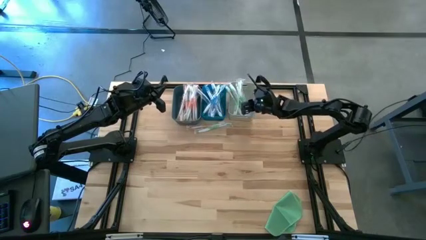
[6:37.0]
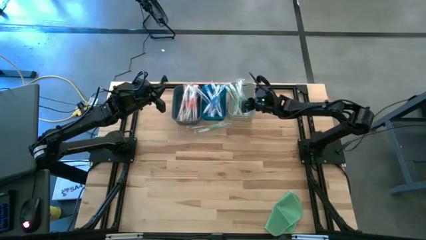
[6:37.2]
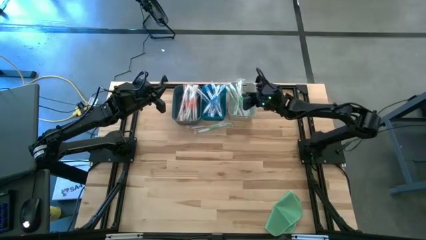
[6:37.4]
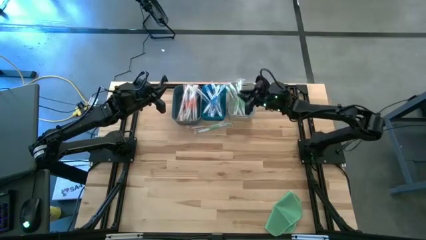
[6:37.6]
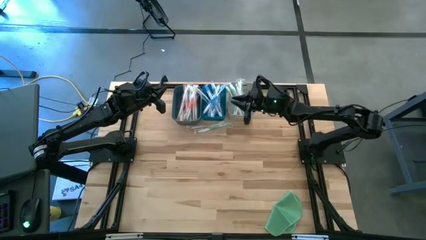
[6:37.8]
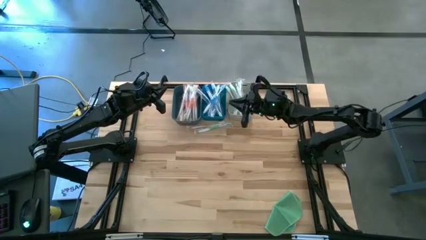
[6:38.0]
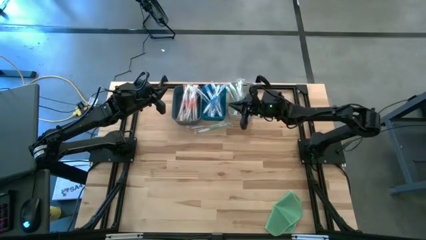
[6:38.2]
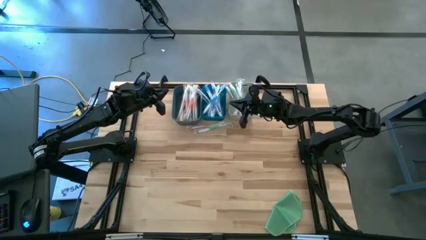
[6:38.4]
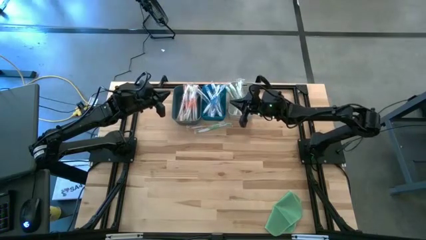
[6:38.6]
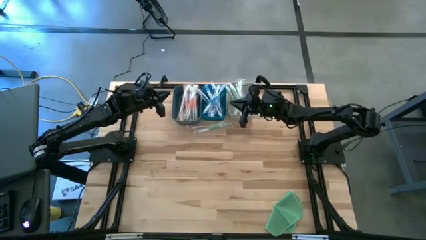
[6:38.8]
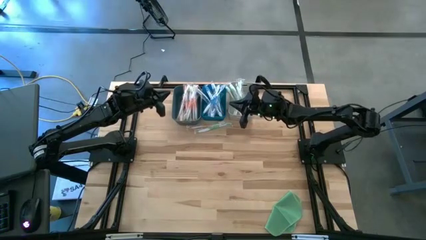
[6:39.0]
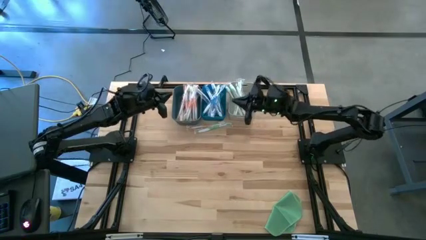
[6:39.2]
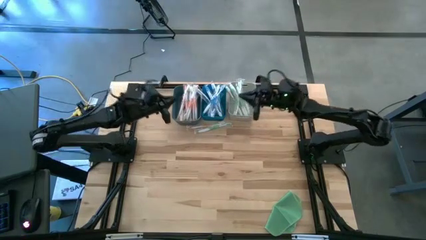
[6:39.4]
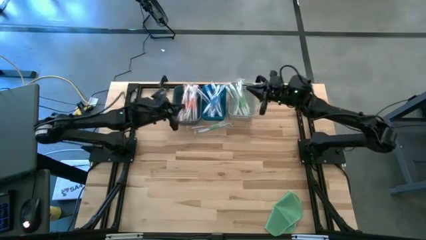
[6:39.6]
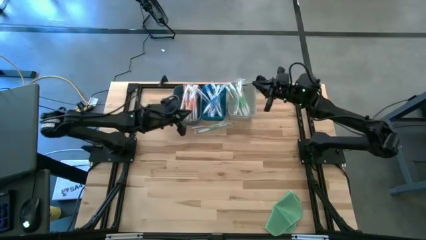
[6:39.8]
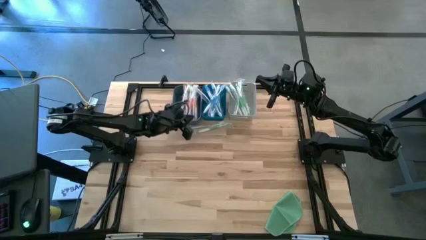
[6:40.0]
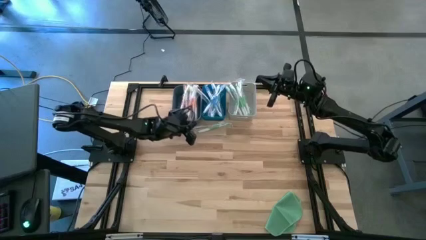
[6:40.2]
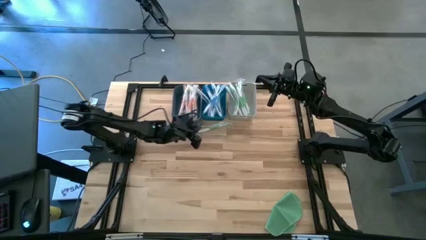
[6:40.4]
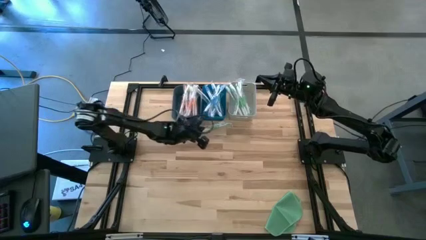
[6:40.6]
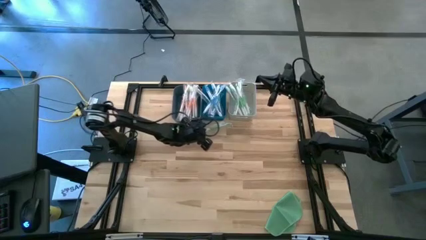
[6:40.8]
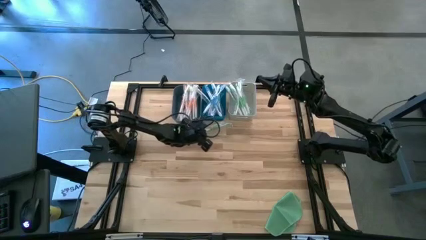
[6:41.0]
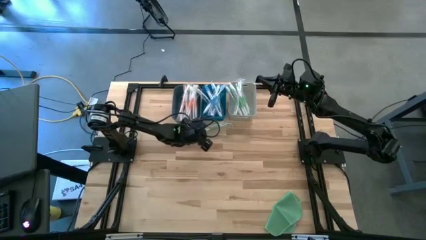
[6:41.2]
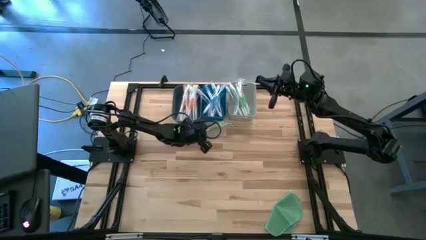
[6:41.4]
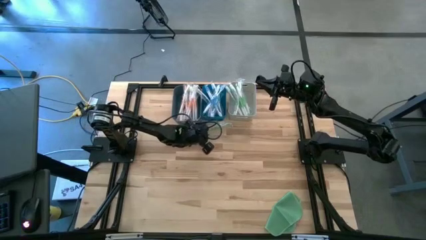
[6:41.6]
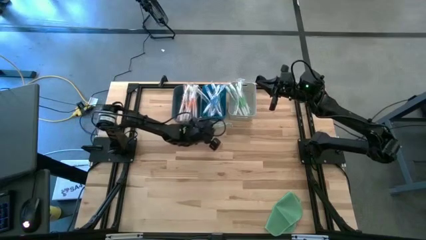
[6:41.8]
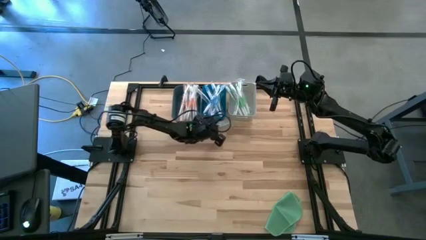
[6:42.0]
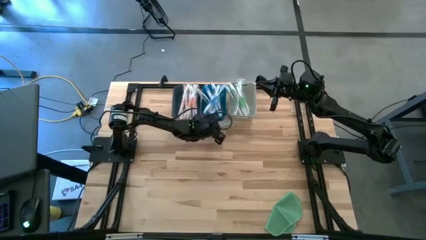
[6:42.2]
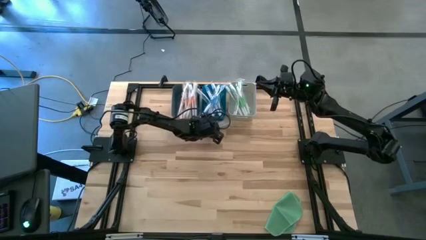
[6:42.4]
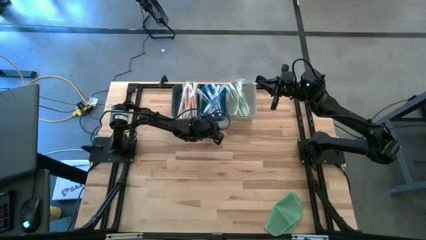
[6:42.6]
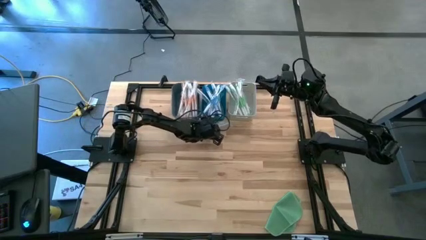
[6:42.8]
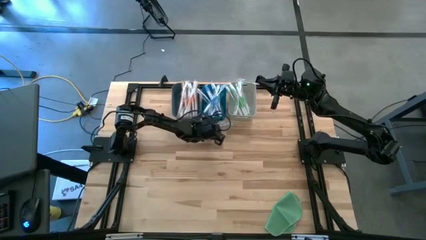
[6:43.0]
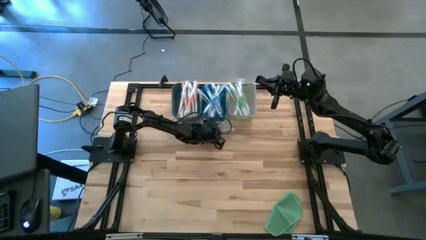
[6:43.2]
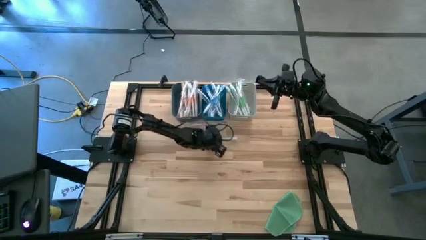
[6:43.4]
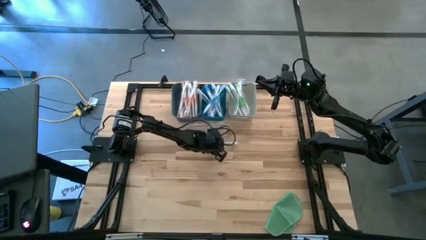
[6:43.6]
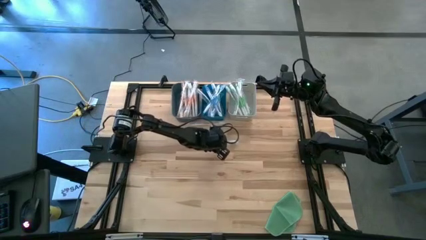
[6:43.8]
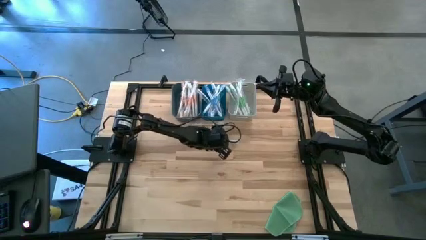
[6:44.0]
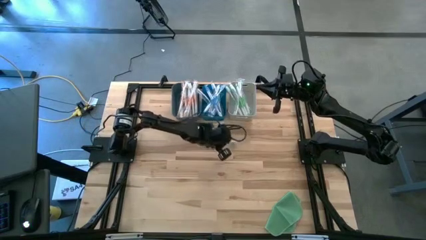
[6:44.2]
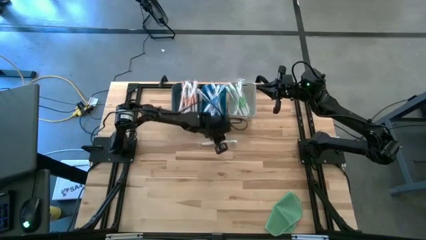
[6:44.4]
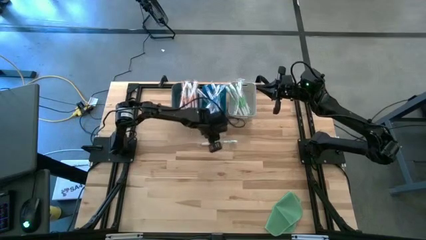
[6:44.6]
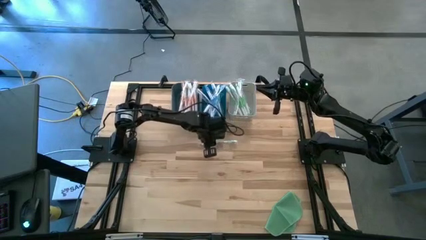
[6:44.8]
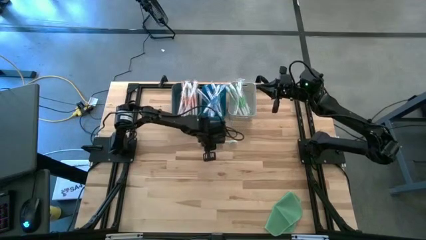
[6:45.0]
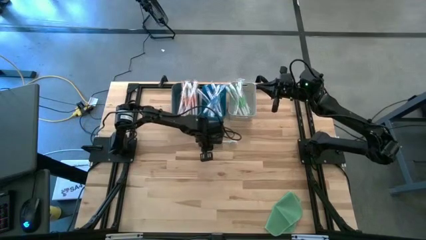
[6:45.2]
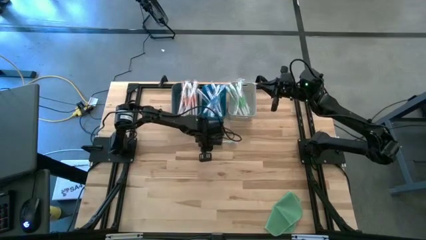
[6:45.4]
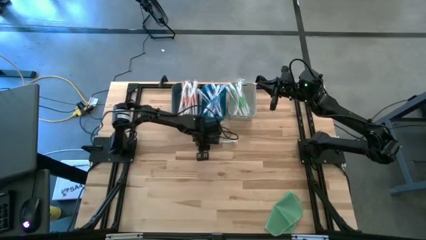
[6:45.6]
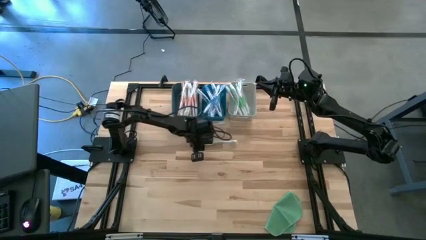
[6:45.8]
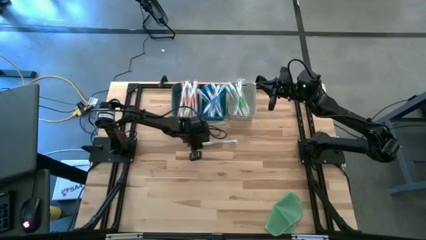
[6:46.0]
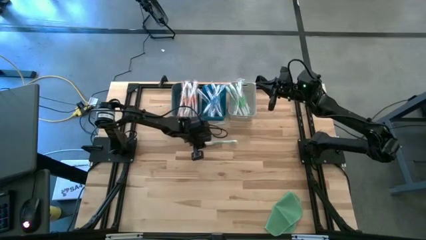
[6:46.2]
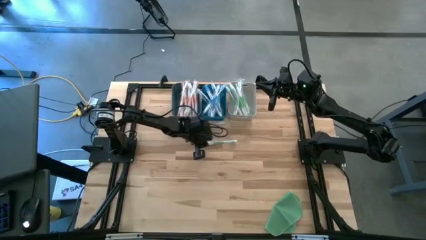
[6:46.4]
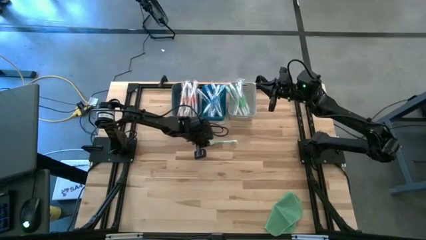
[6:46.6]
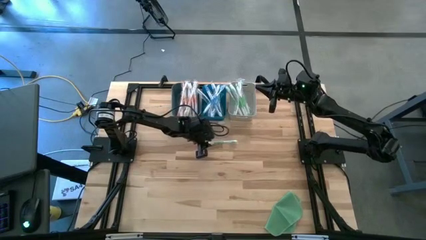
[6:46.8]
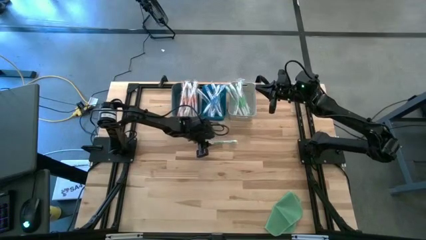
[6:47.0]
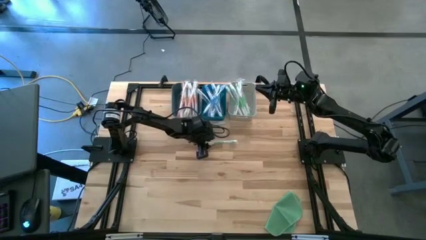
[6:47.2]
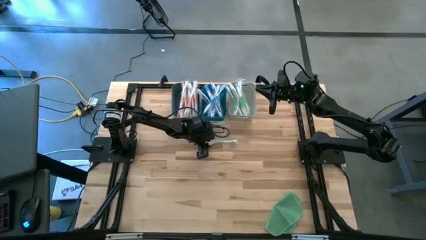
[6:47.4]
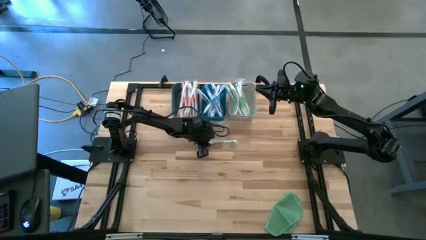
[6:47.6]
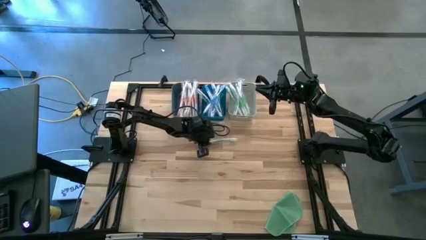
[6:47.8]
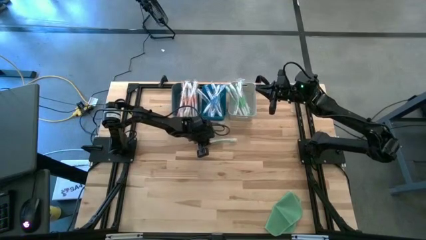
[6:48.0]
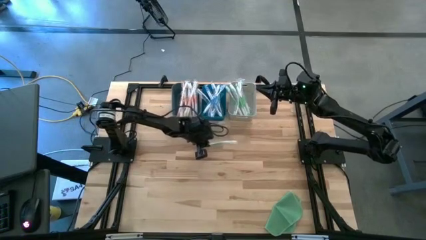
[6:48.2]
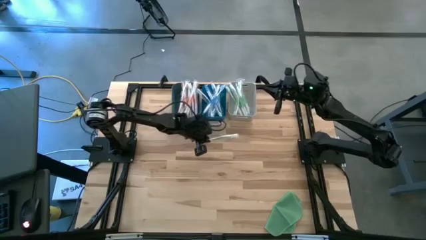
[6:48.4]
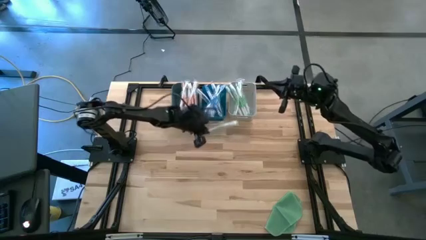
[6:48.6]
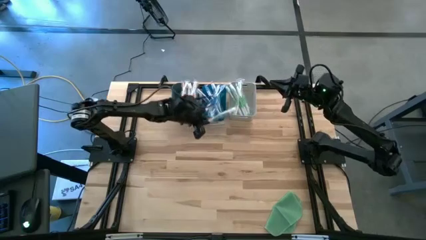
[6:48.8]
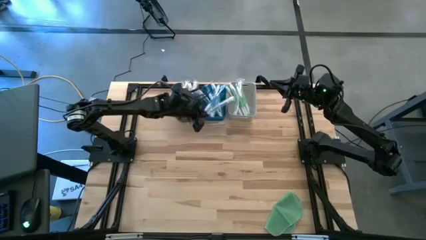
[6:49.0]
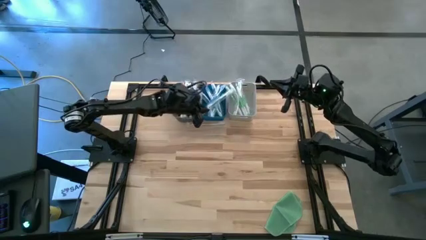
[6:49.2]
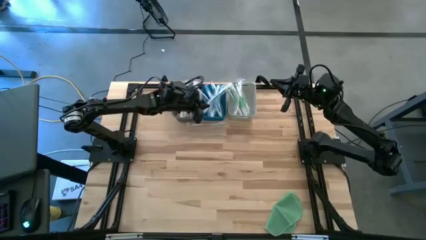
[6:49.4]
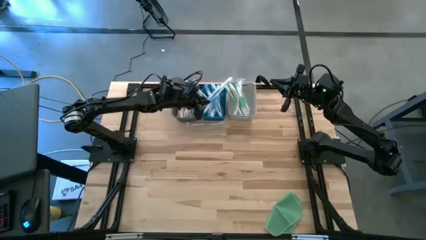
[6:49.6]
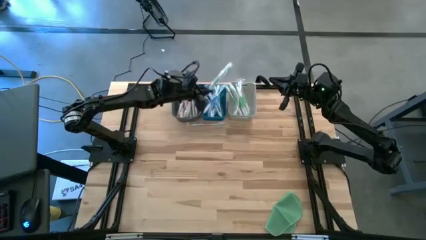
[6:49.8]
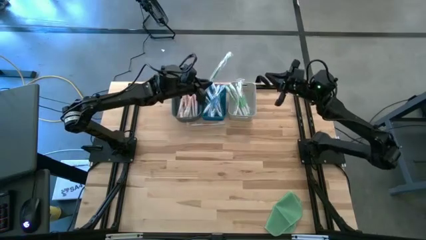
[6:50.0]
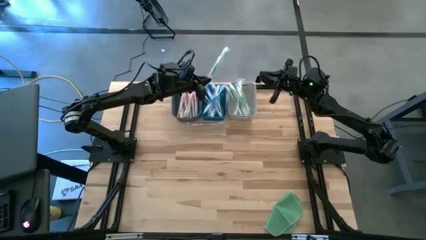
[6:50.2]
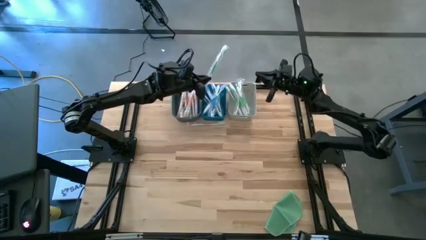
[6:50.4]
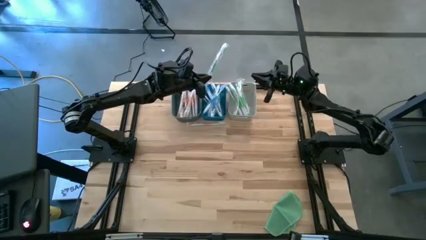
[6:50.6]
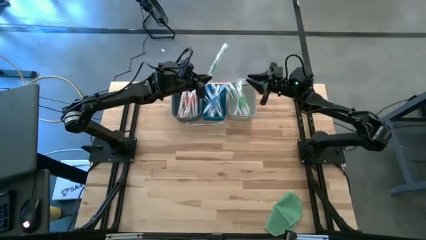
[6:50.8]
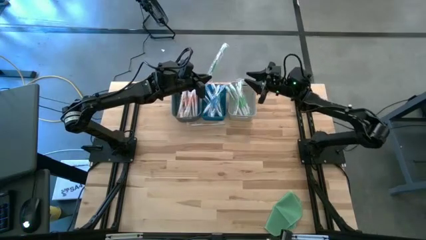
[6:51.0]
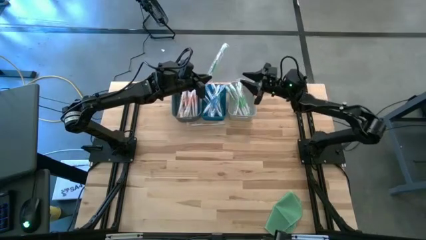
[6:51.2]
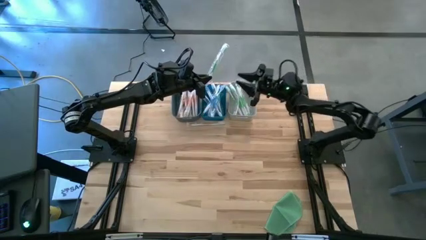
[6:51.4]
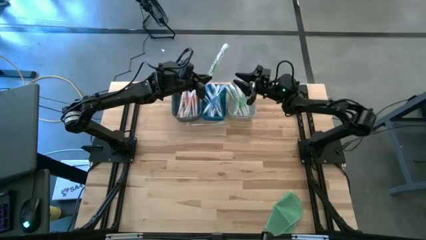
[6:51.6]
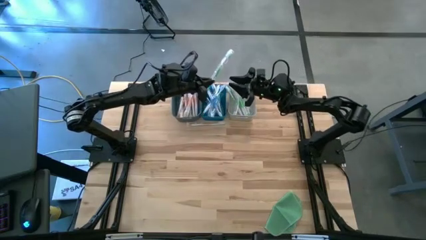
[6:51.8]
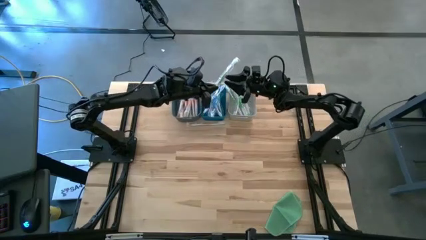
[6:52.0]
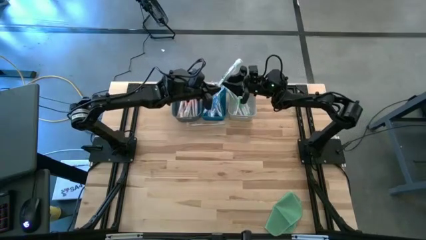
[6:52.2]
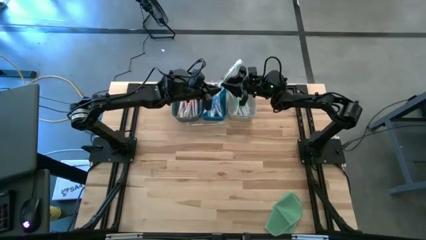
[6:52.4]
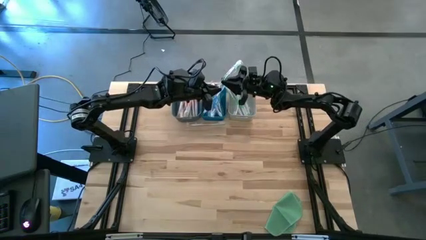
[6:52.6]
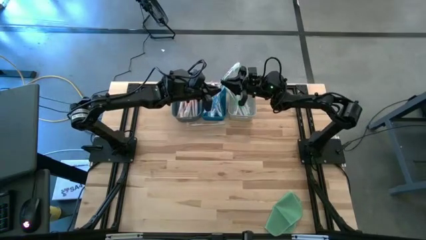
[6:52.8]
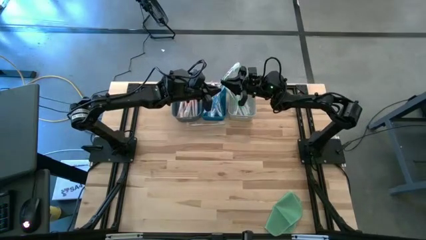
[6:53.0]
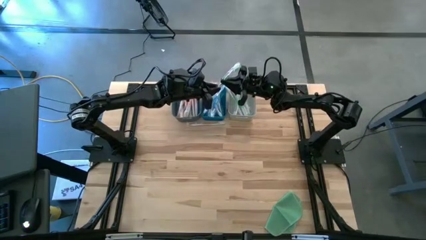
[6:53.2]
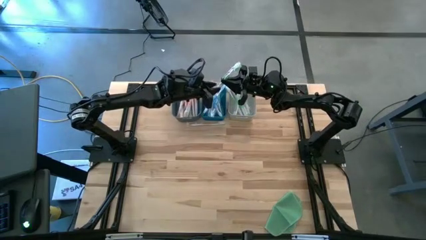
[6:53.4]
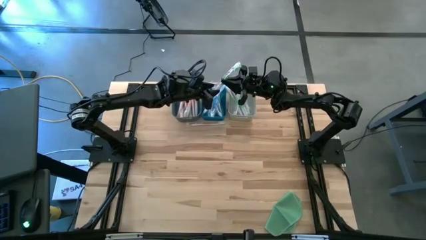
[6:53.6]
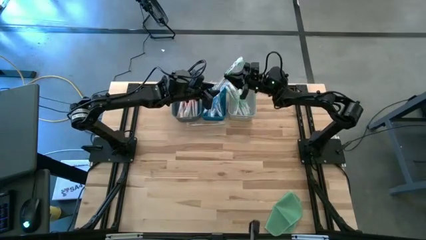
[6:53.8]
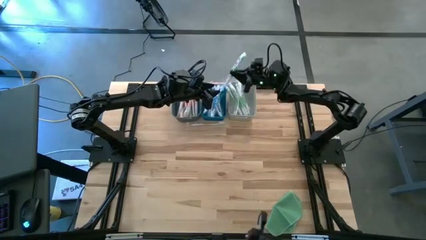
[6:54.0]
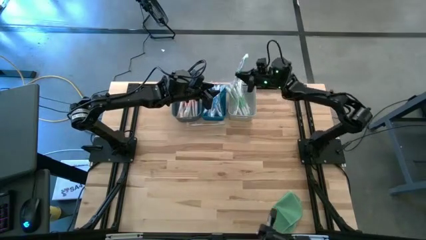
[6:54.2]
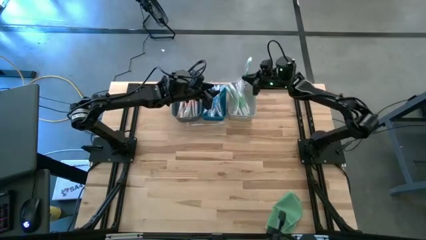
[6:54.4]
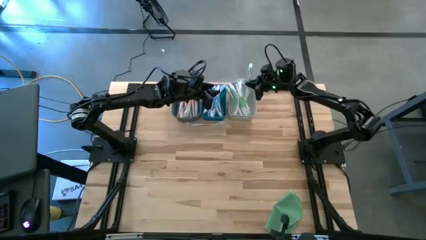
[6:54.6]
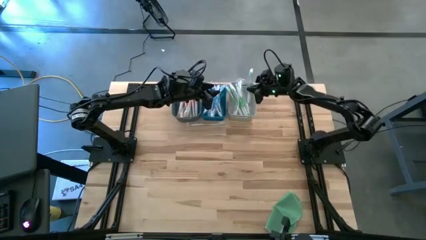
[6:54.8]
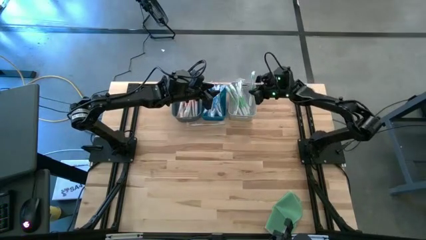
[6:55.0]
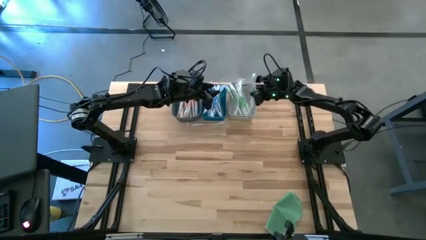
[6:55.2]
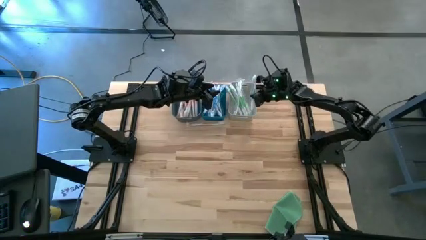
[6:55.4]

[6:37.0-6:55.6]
Task: Pick & Place Toothbrushes
Put the green toothbrush into the white bin
